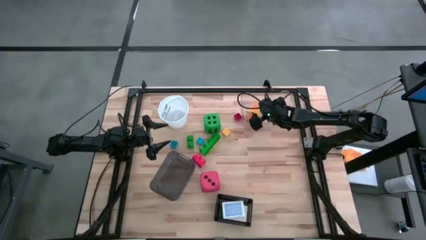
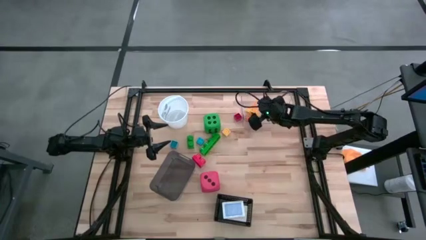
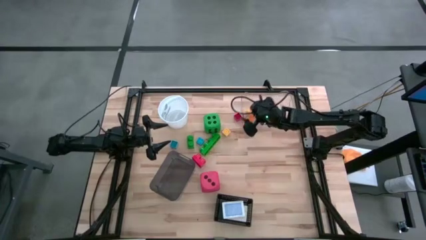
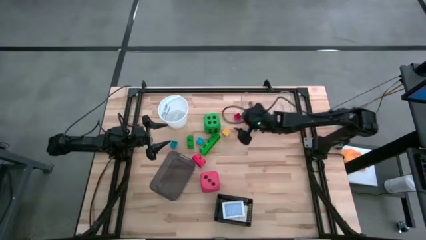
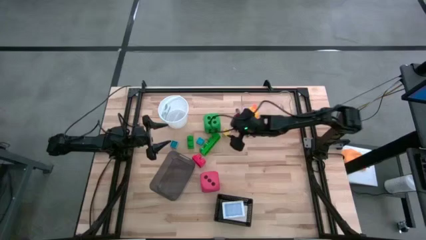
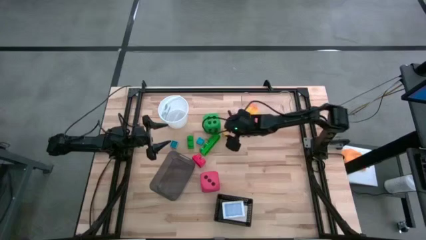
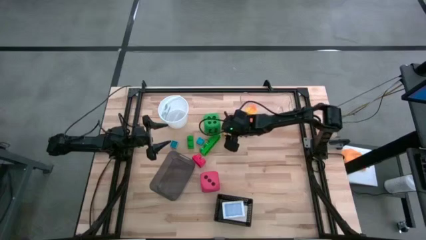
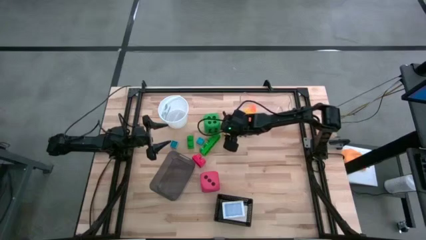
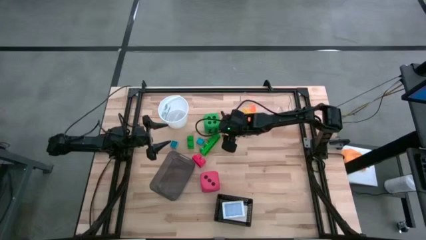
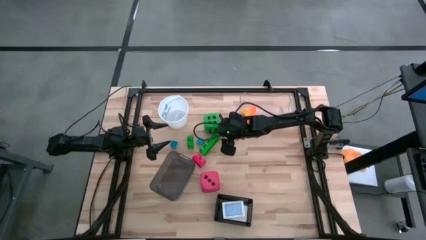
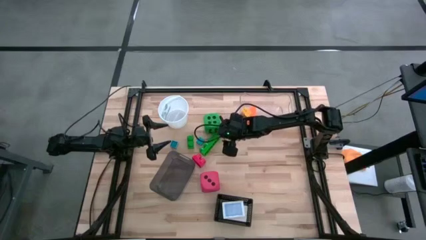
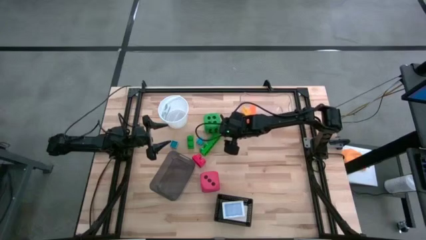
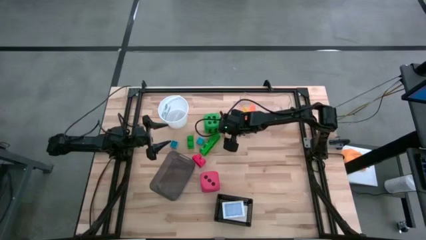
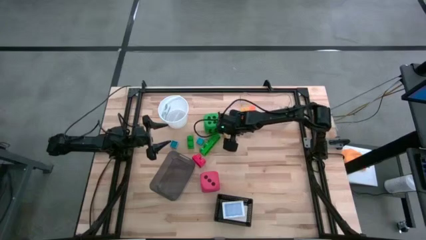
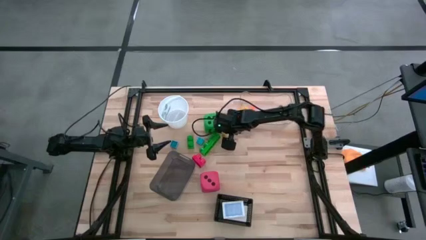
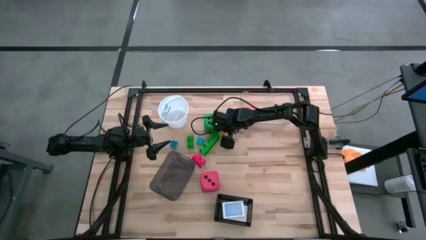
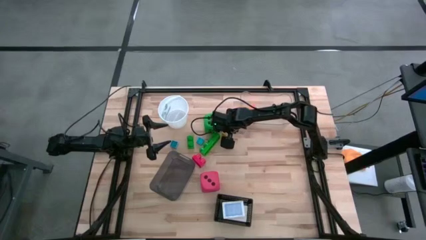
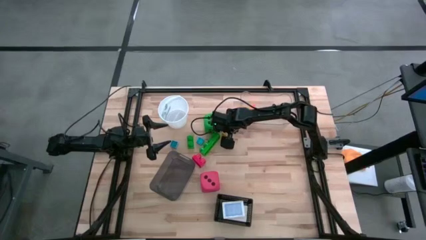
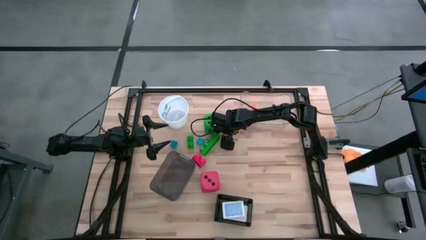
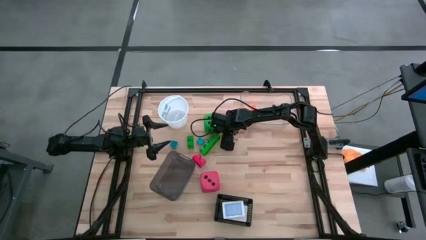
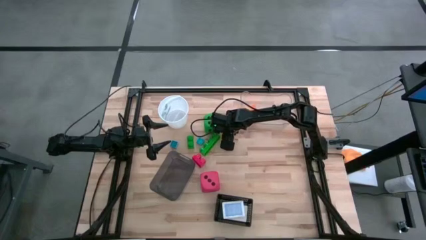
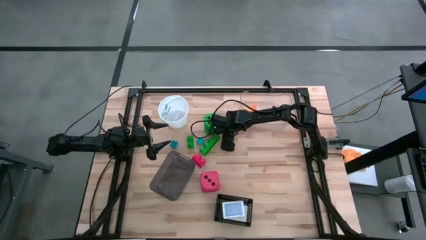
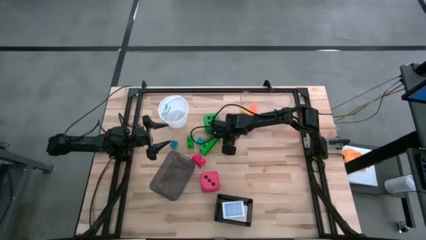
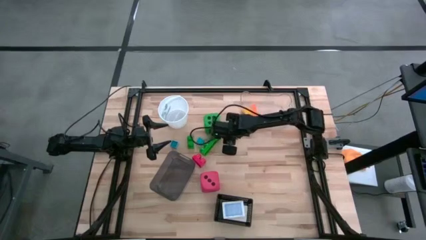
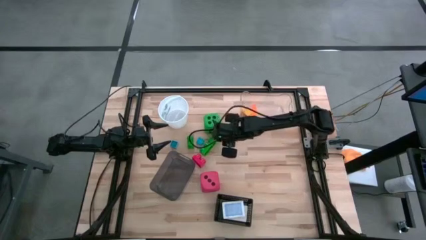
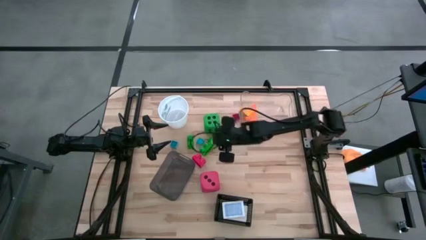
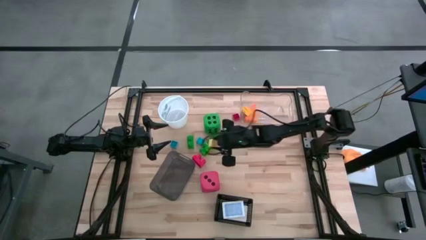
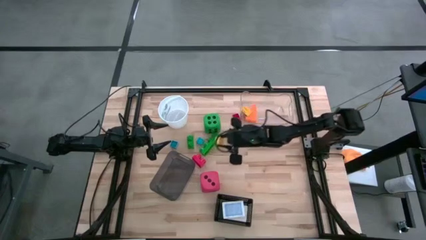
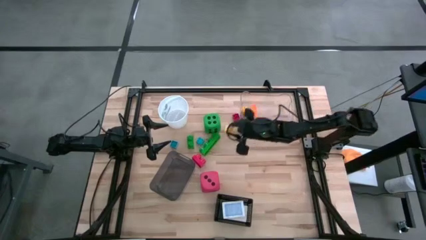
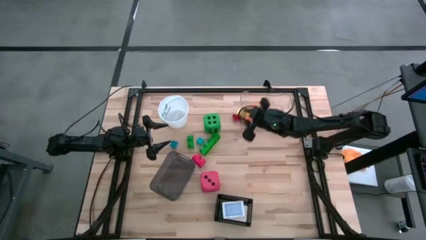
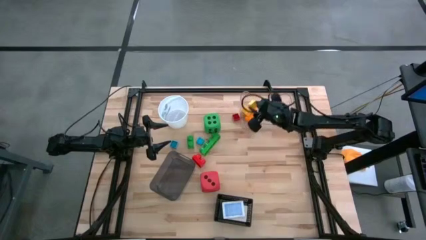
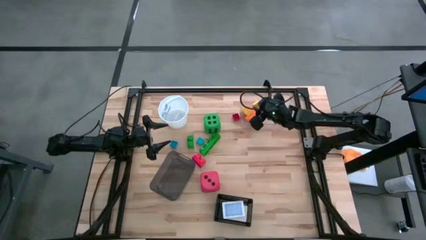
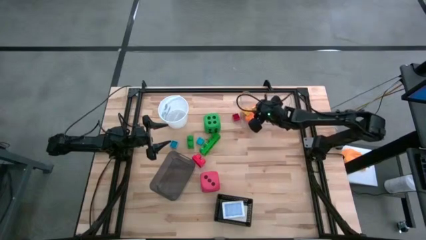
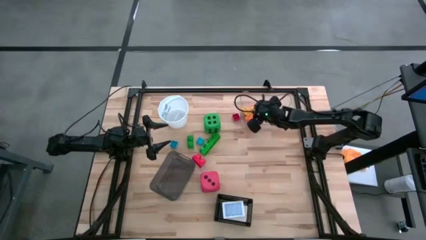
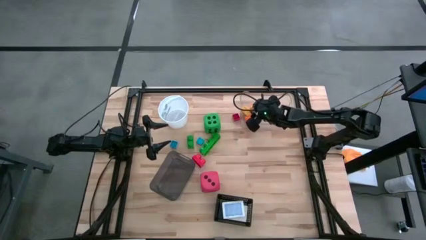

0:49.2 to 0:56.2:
Task: Pick & Place Toys
Put the yellow game piece into the transparent bin

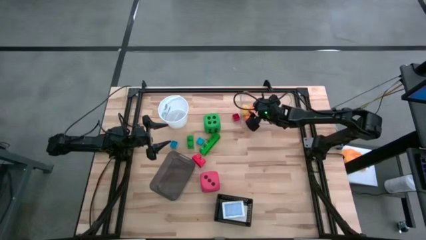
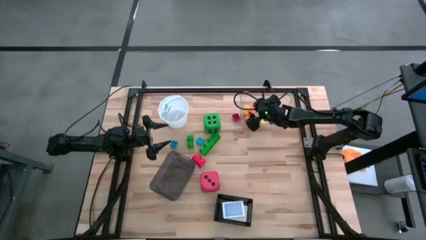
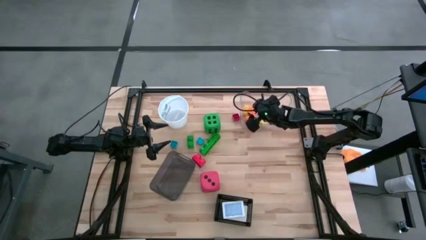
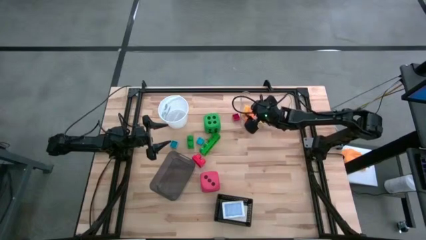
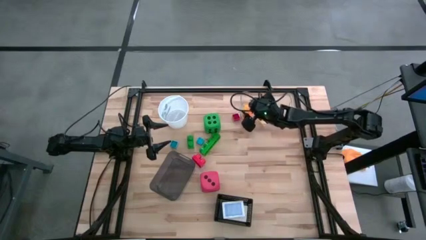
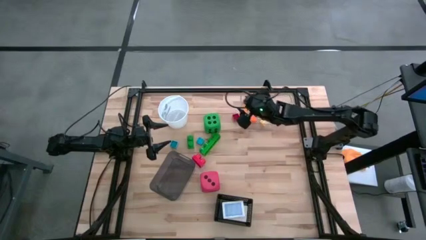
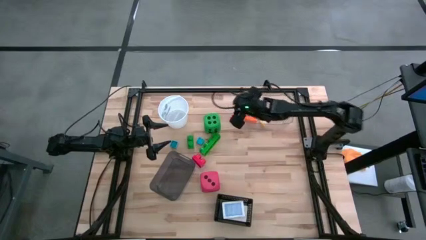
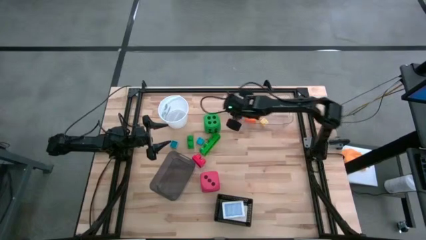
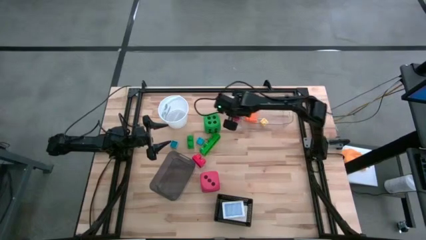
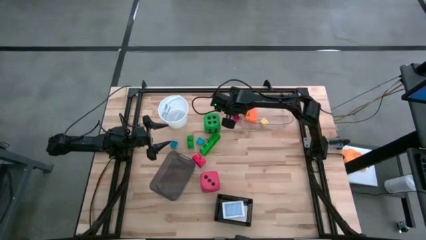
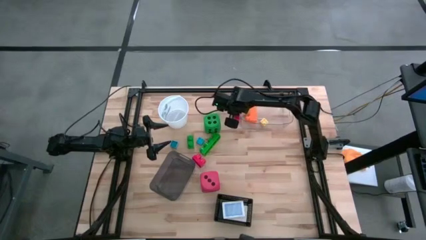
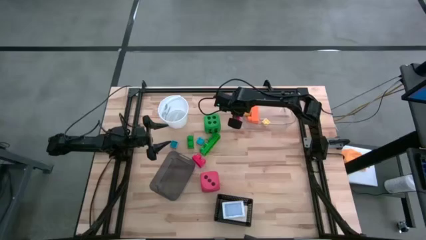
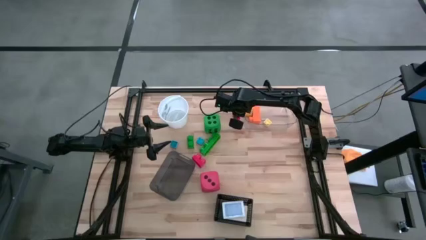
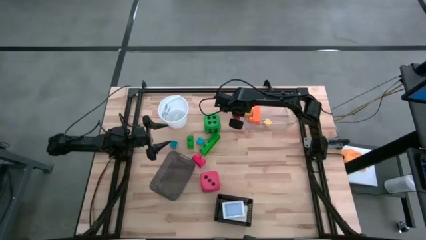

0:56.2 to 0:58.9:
Adjust the transparent bin on the table

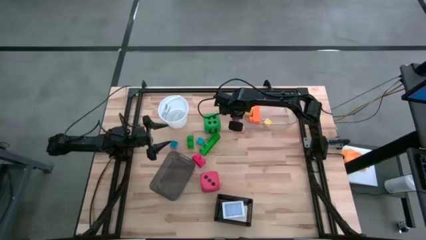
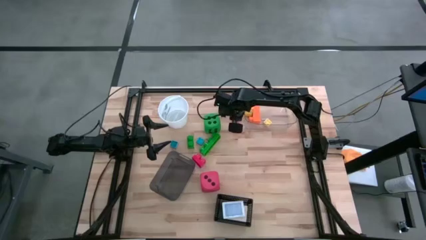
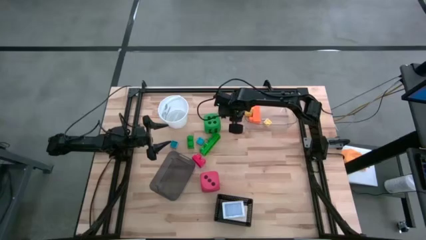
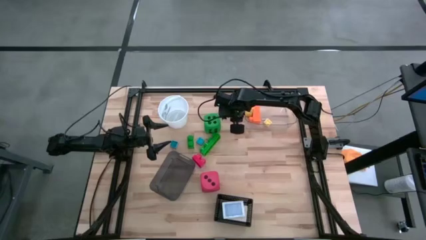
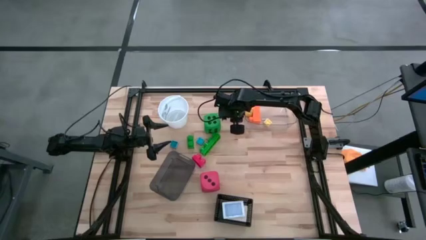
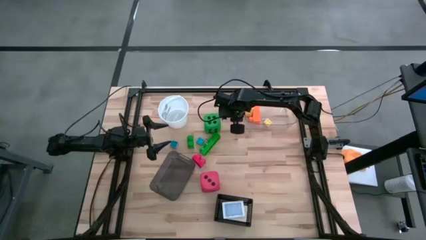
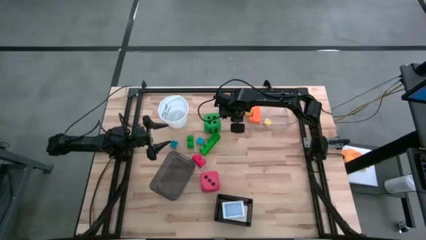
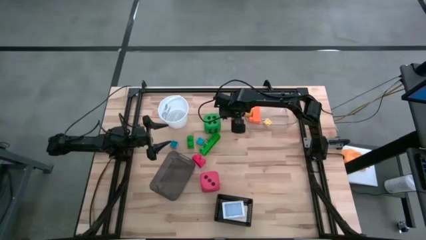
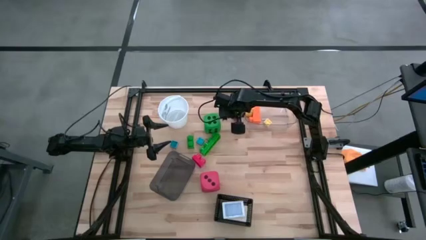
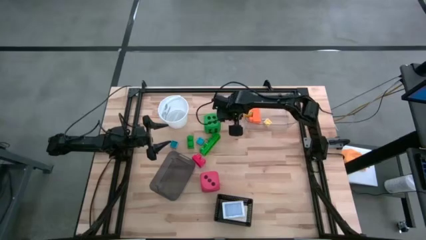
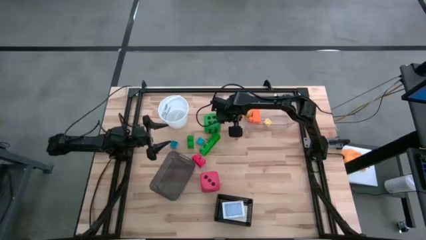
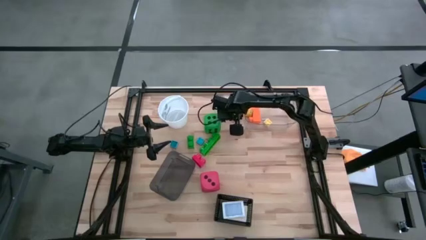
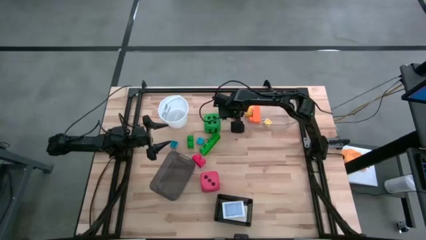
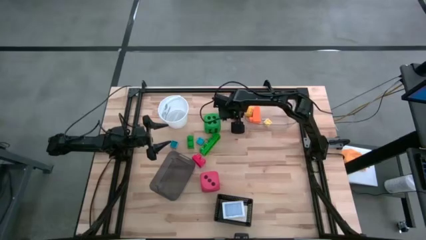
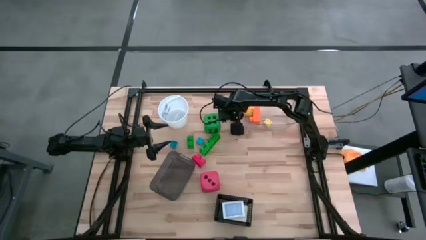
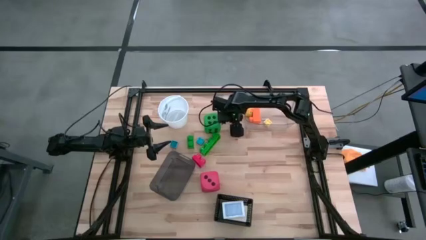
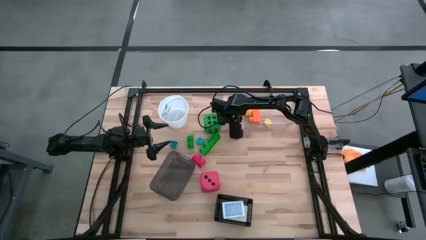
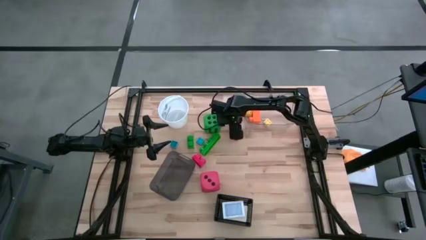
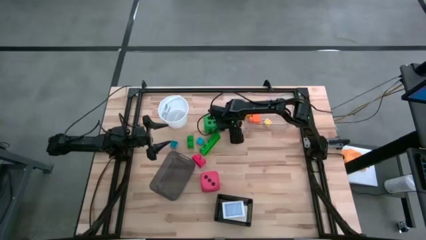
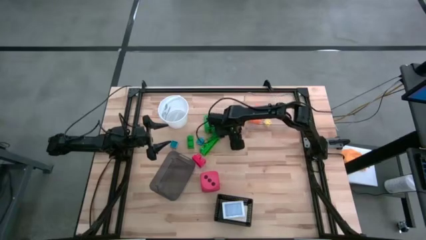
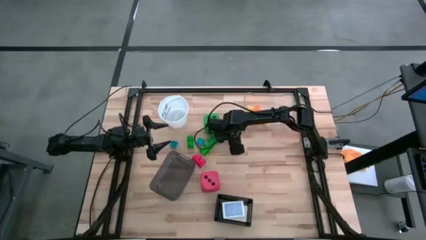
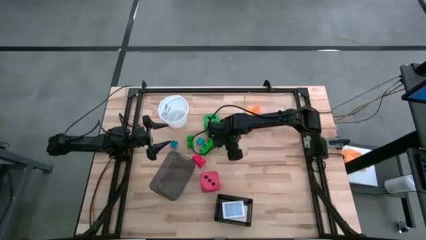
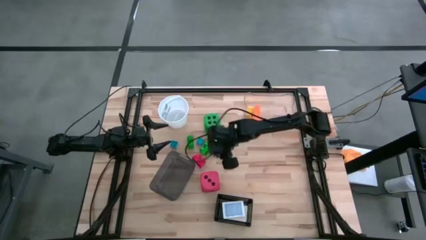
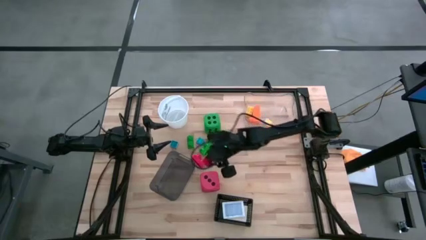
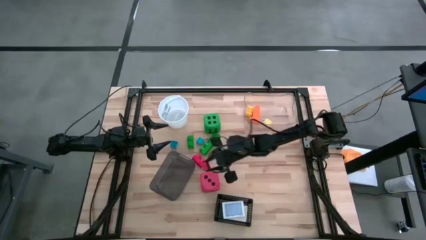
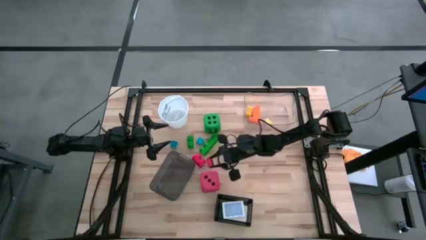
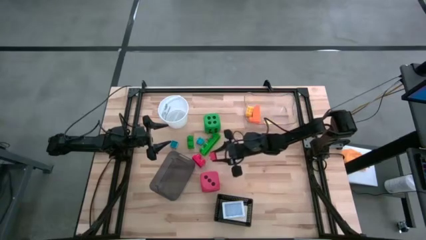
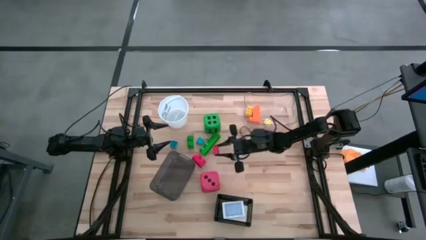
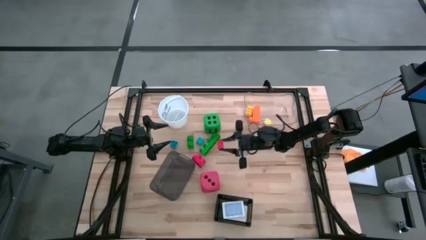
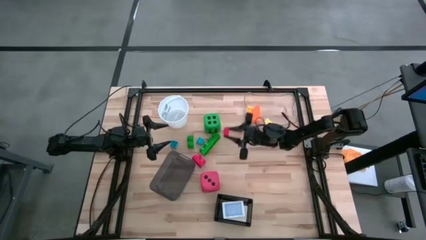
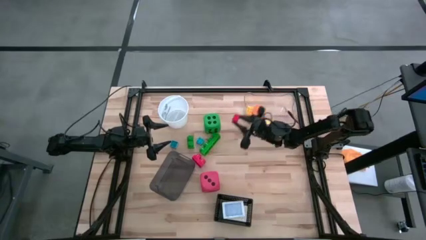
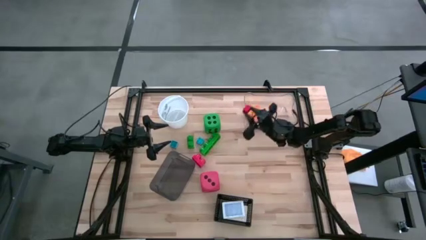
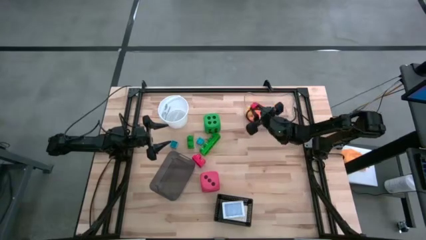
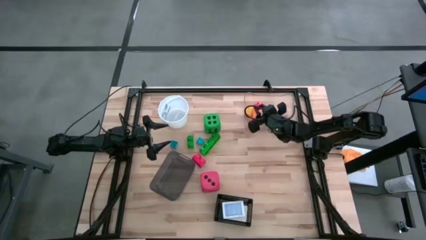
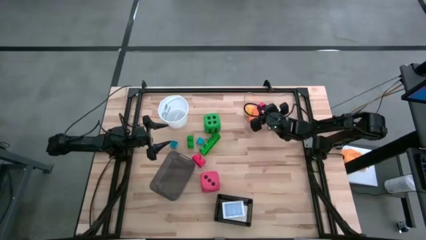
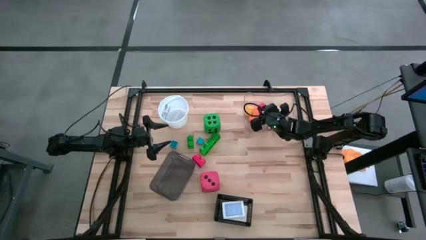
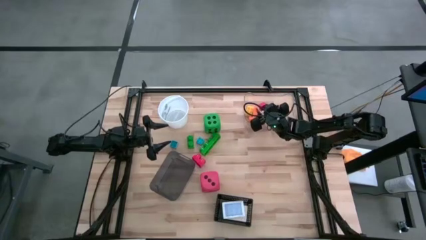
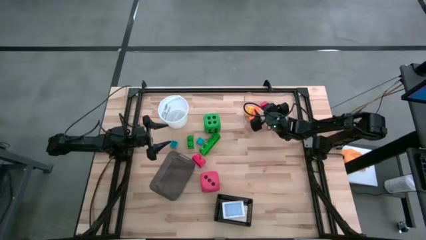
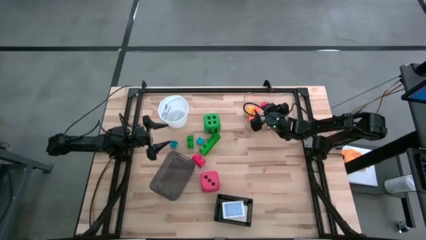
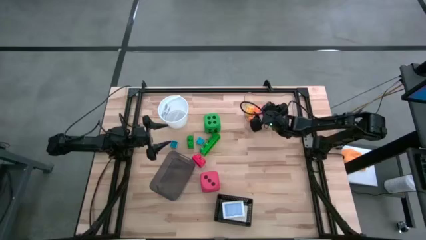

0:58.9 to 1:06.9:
Put the top red game piece into the transparent bin
